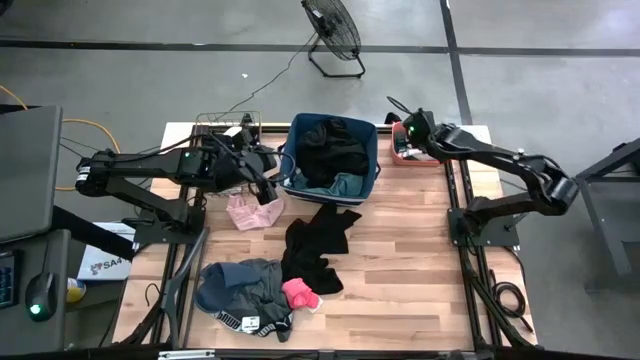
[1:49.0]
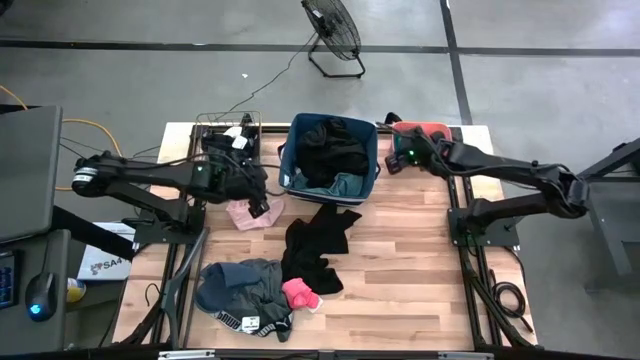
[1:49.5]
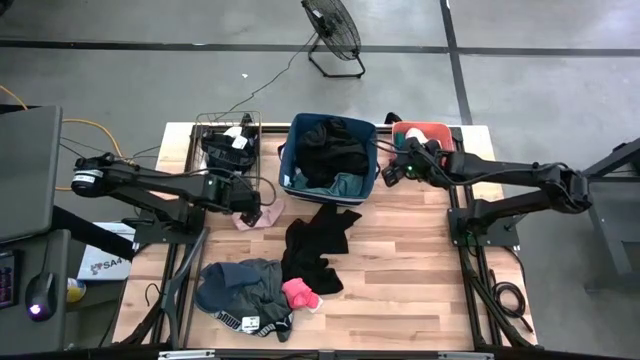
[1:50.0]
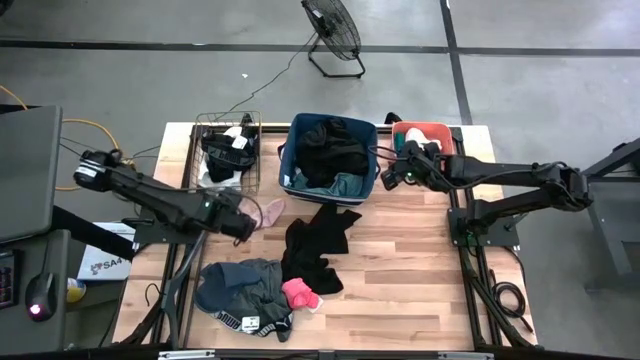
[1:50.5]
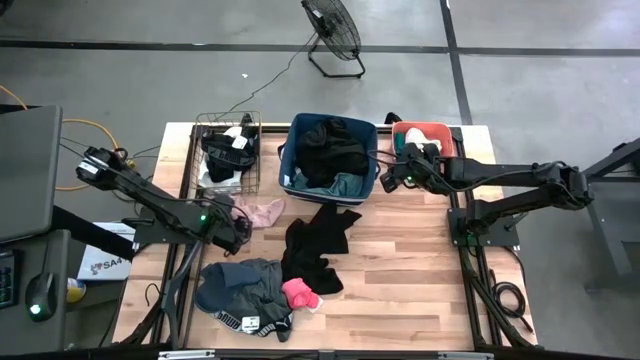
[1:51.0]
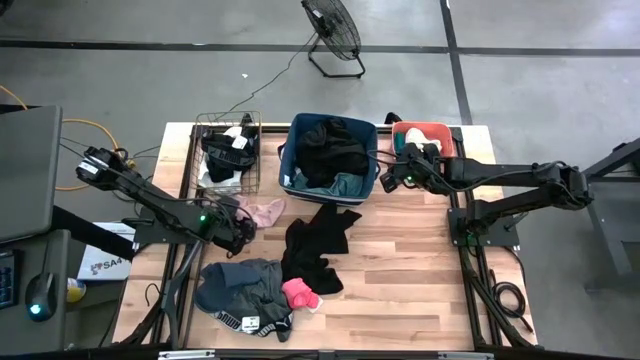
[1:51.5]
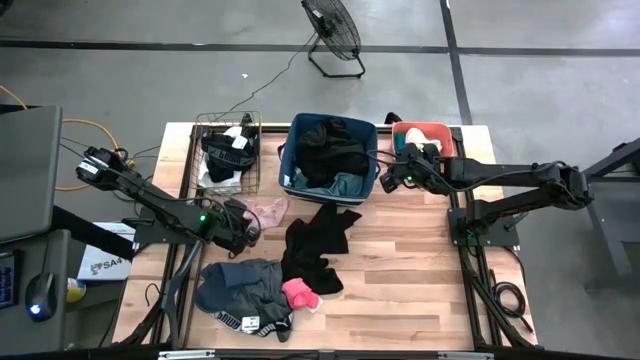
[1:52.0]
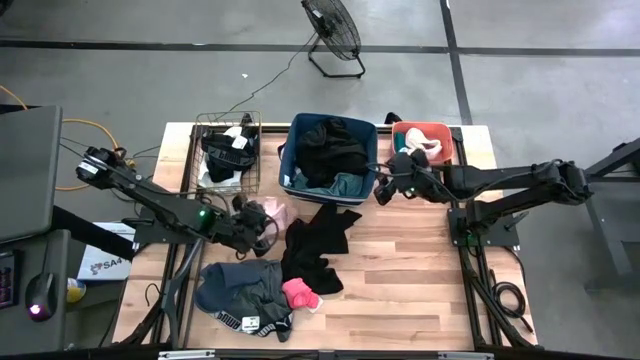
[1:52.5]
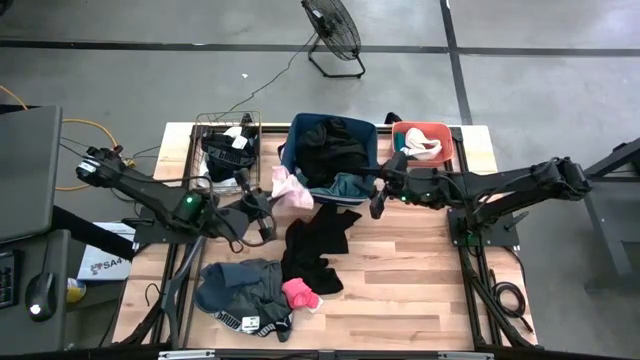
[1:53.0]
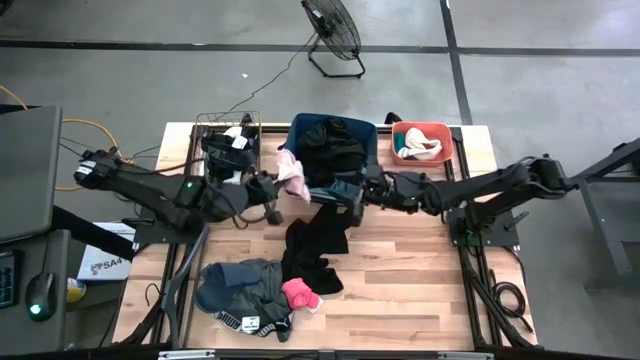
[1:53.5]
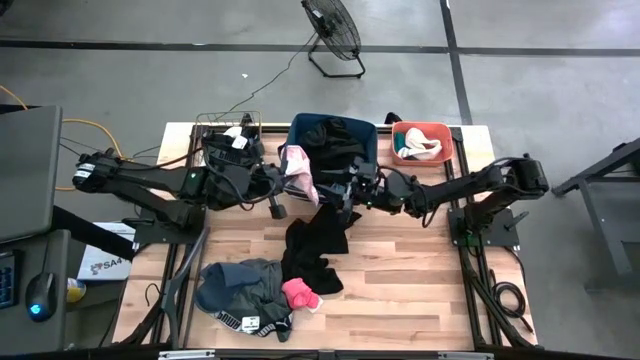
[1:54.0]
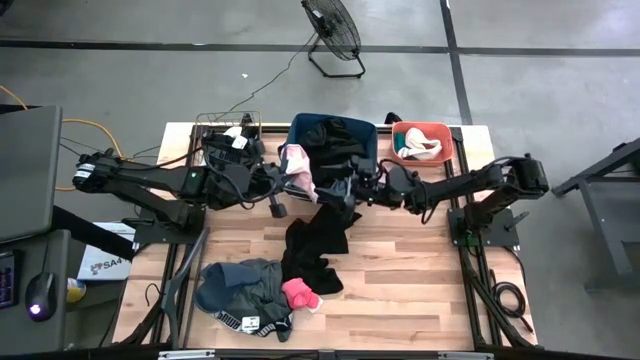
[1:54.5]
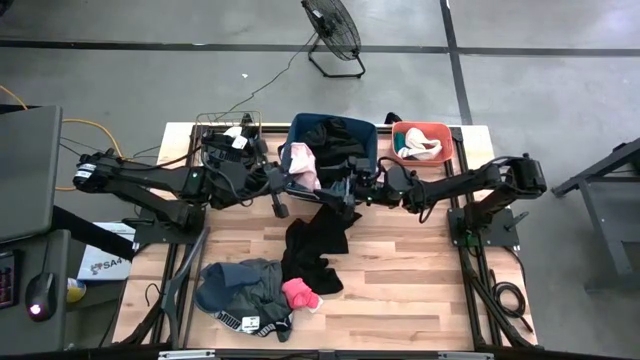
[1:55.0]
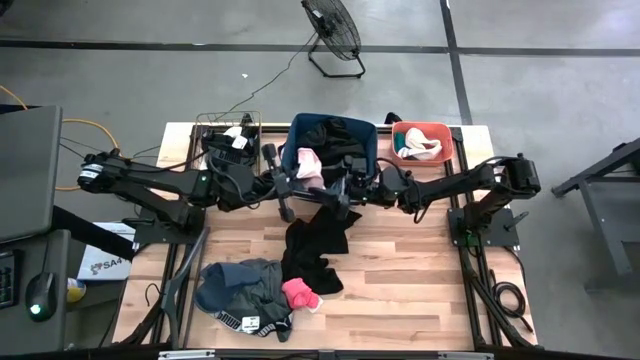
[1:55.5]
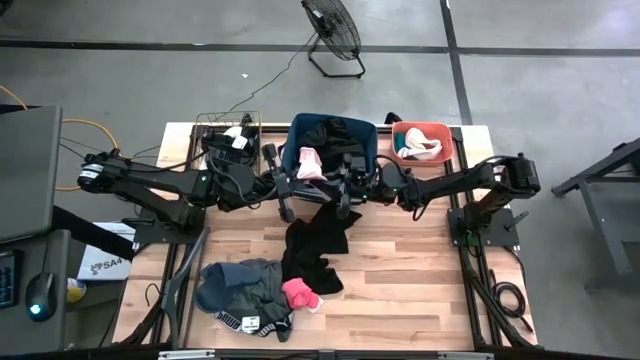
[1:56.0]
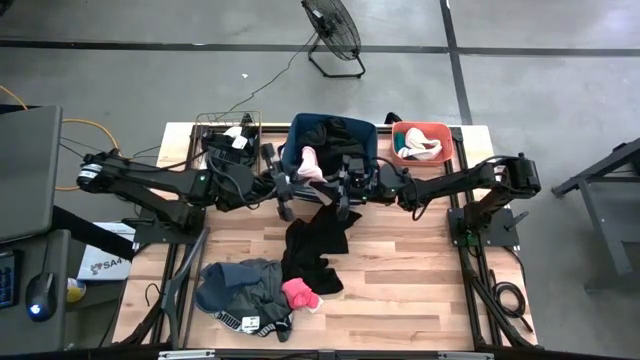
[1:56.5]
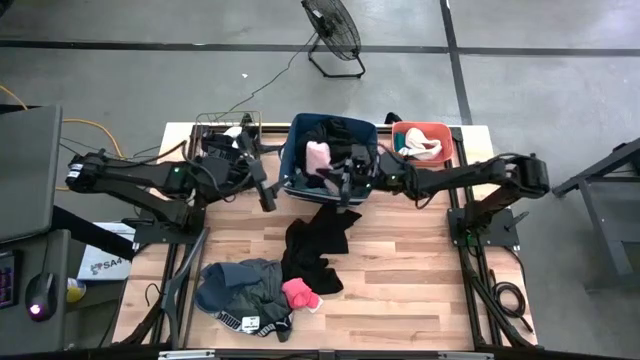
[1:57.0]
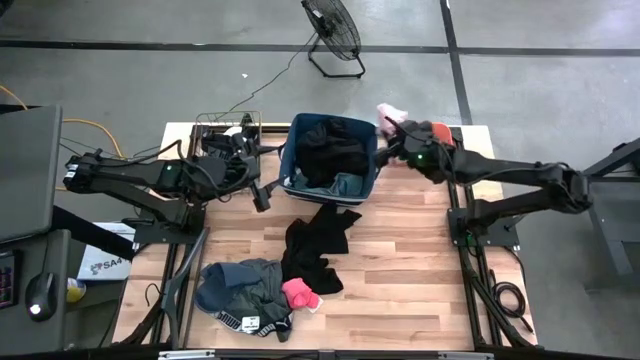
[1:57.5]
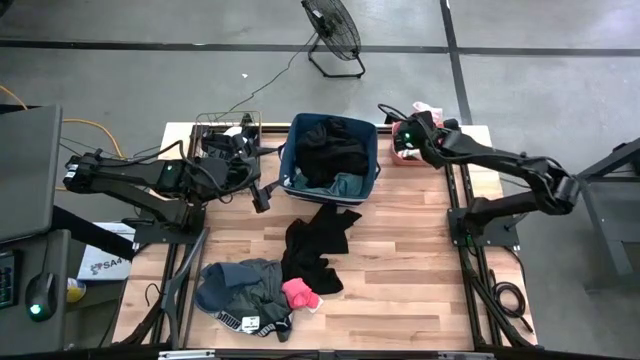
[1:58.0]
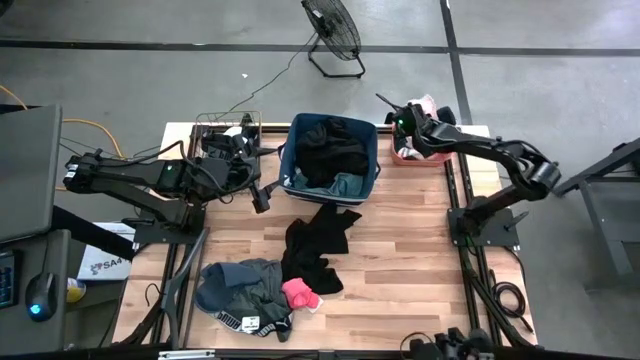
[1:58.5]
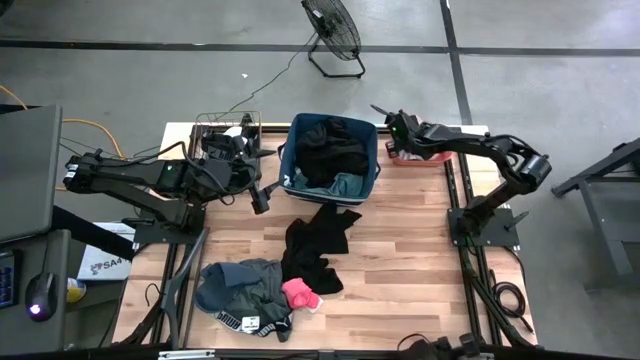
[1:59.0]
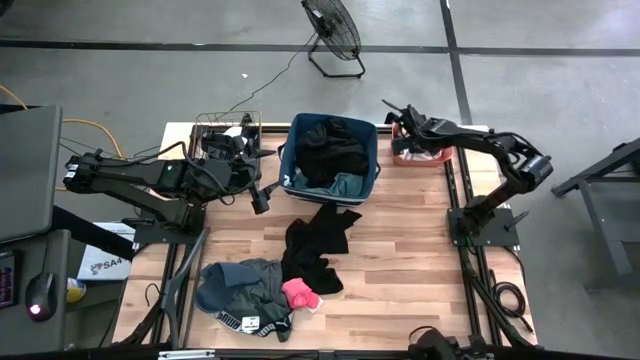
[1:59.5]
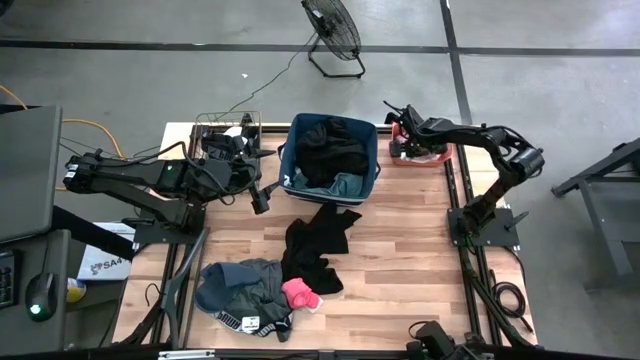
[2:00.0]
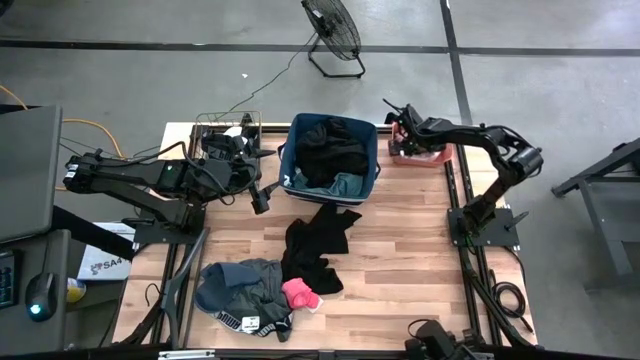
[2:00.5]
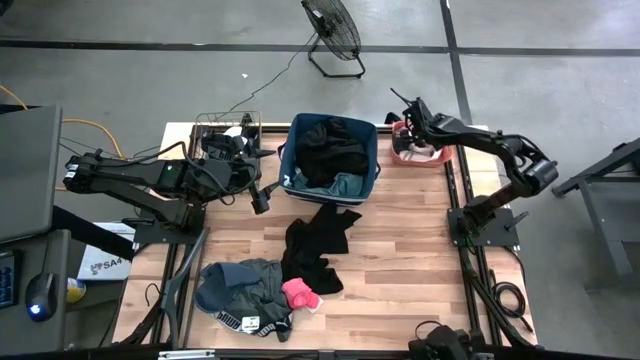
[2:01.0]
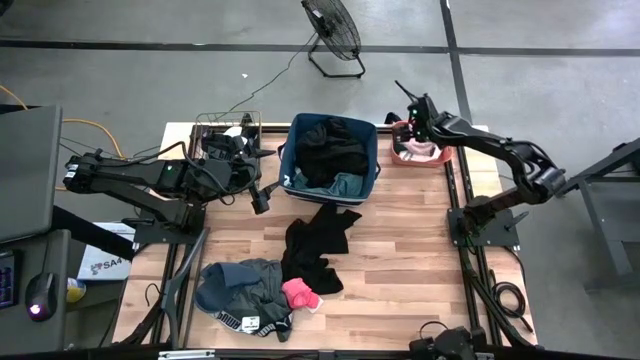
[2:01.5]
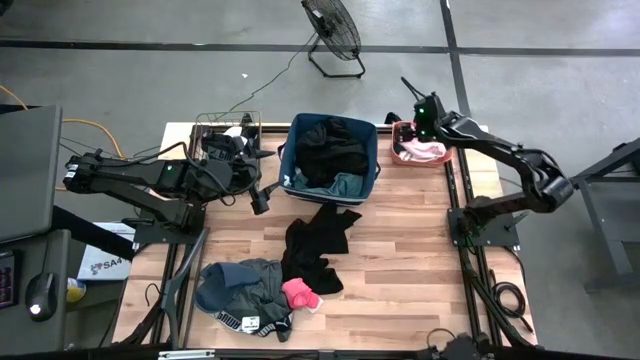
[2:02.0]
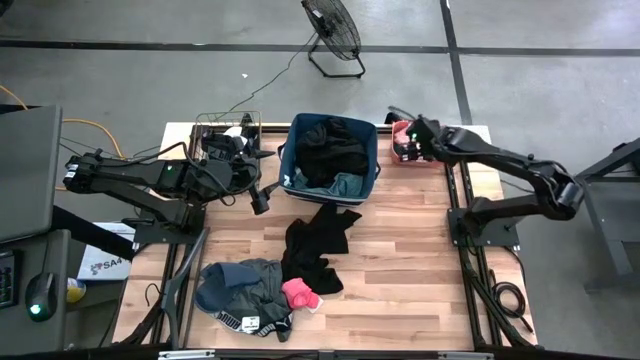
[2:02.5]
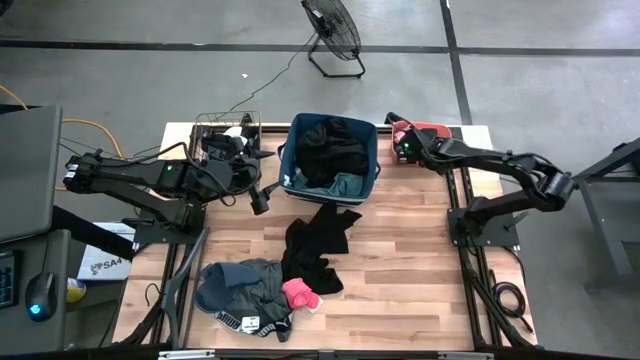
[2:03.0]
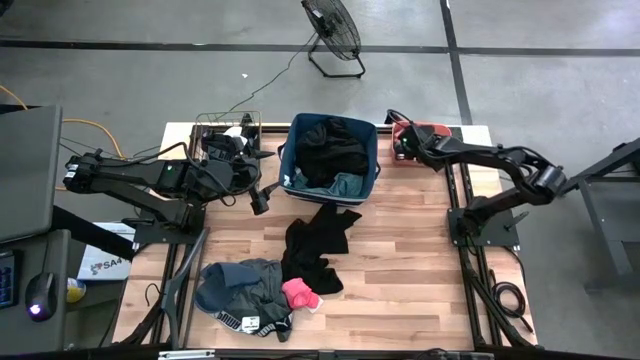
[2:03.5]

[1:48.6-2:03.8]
Task: Pick & Place Cloths
Put the pink sock into the orange bin

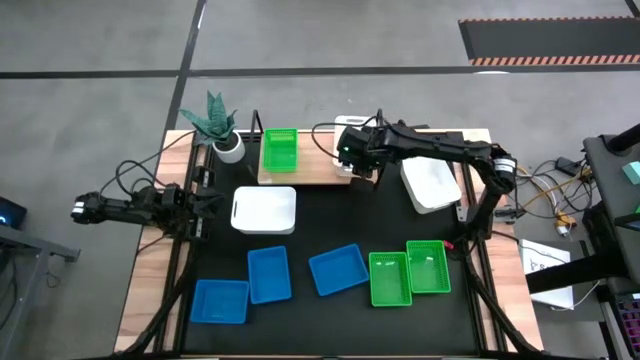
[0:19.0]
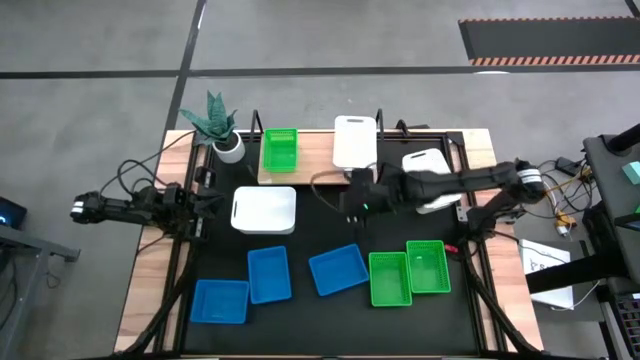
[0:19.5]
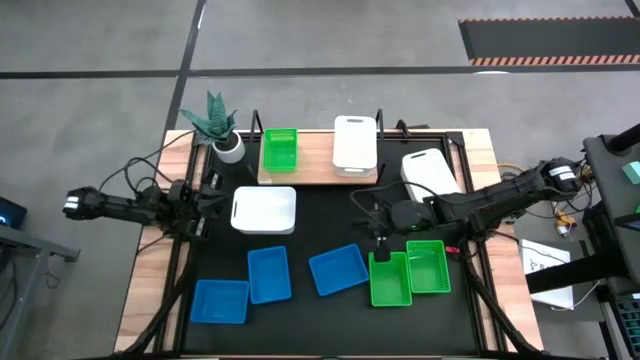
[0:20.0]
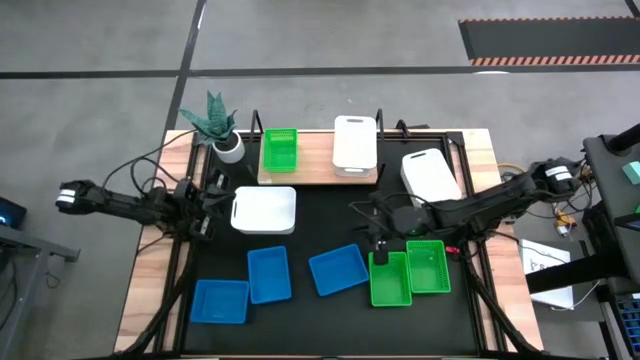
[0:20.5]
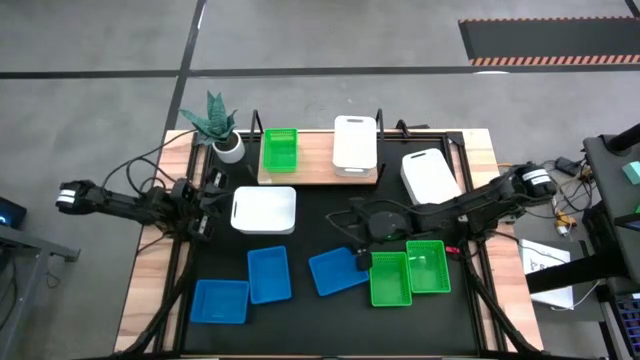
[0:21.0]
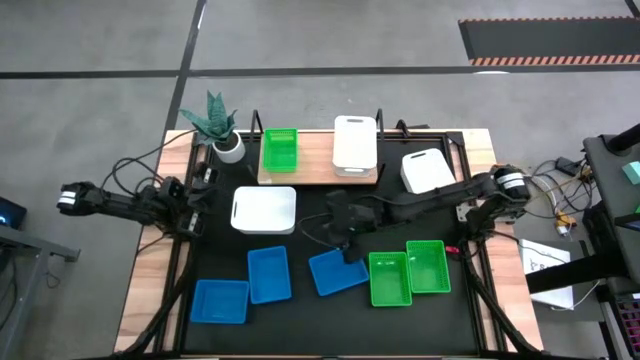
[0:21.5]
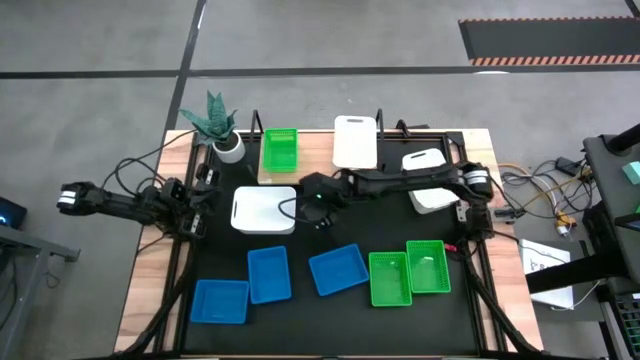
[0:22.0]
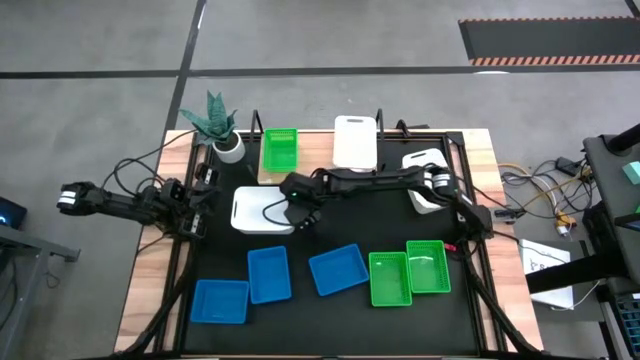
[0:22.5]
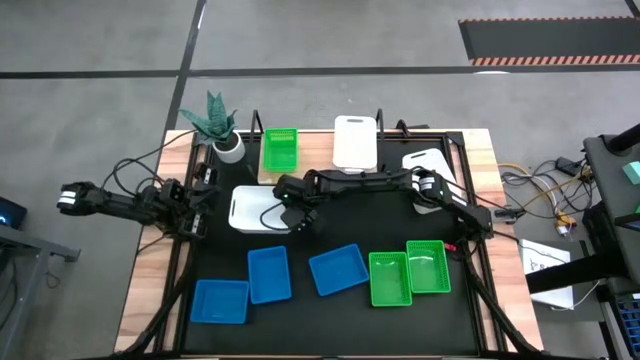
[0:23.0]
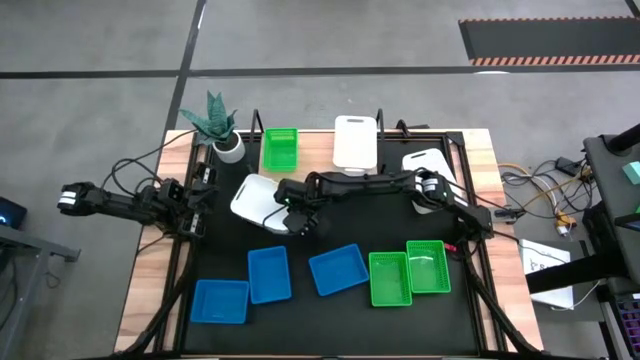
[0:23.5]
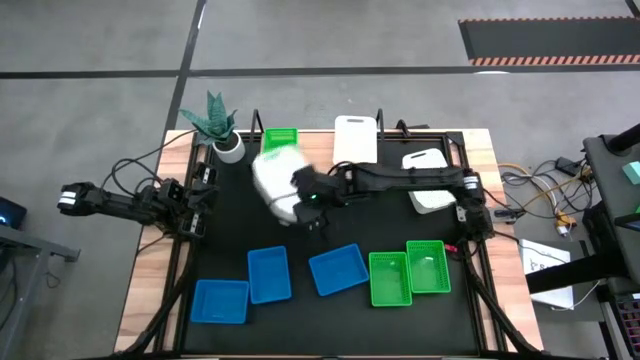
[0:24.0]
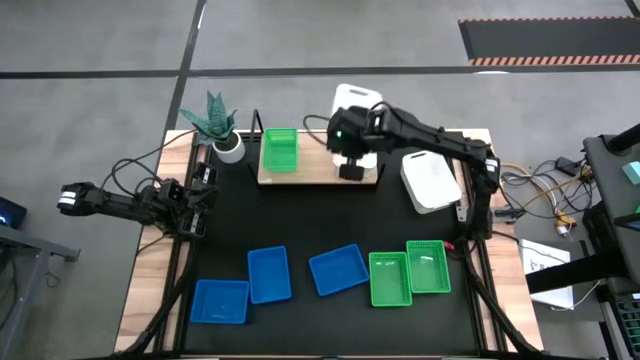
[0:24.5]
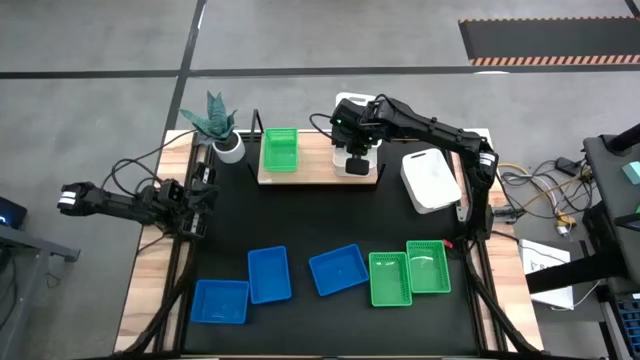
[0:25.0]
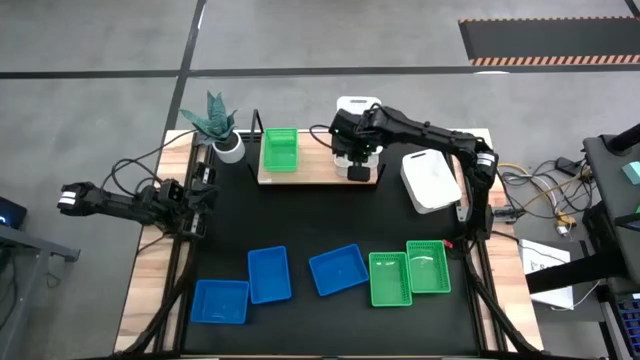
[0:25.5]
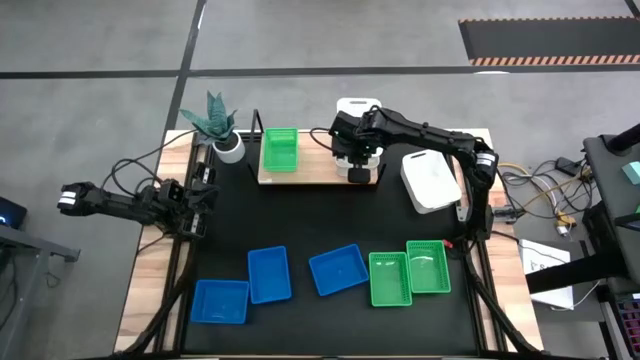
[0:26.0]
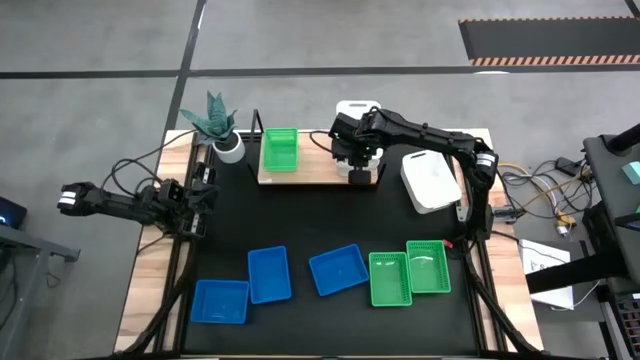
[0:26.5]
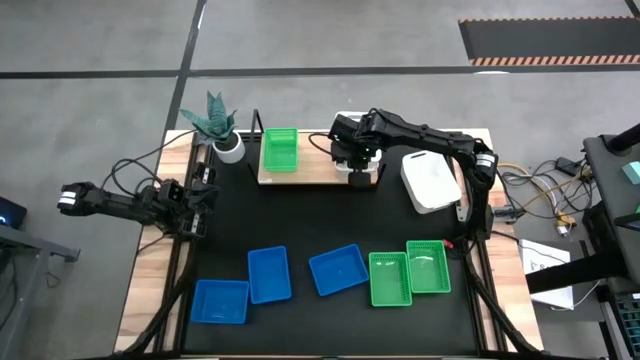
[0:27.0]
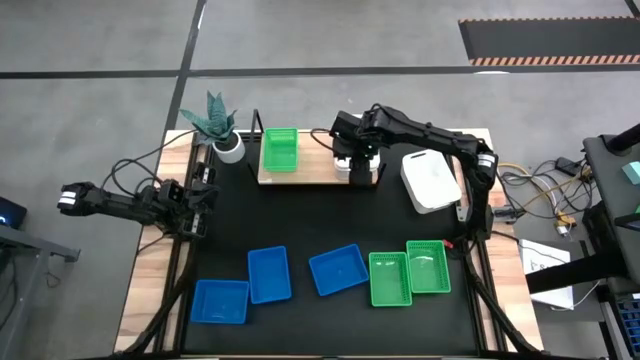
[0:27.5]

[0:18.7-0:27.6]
Task: Stack baskets on shelf by color
Stack the left white bin on top of the white bin on the shelf
